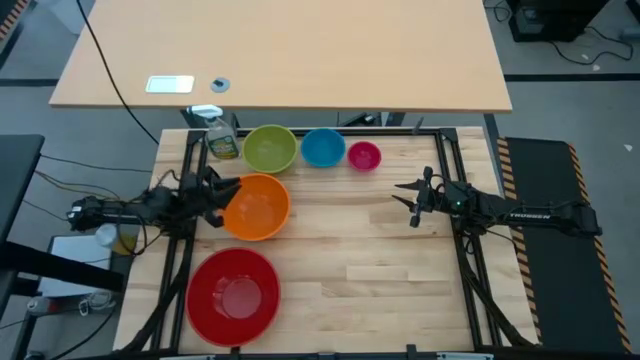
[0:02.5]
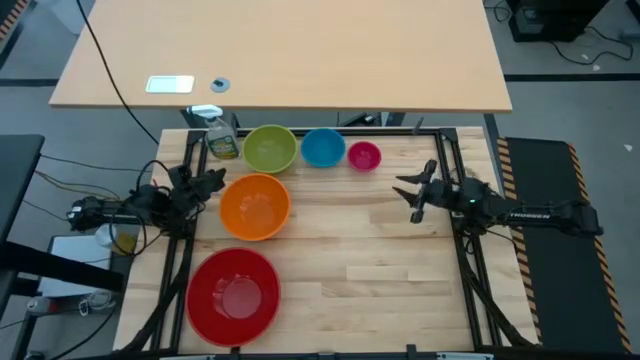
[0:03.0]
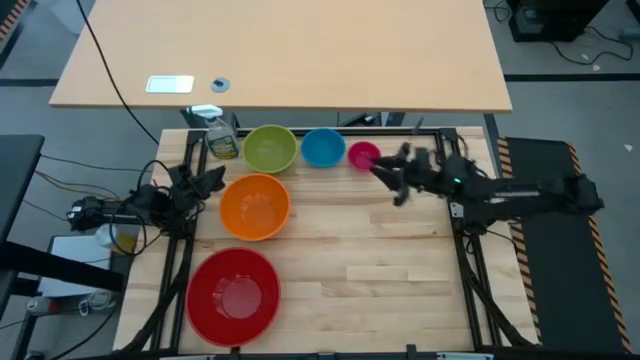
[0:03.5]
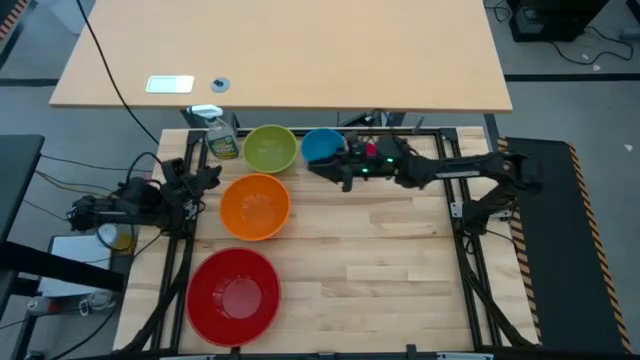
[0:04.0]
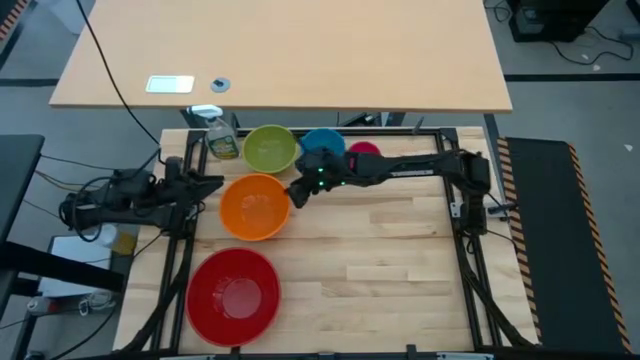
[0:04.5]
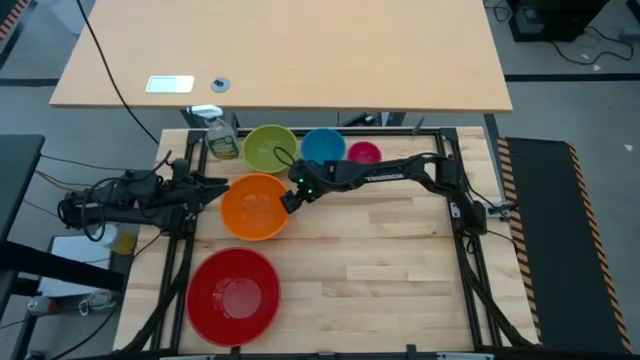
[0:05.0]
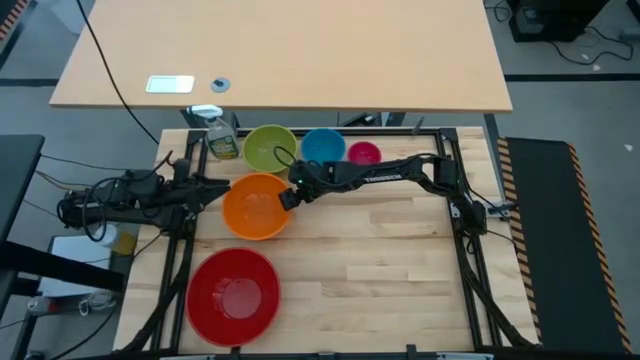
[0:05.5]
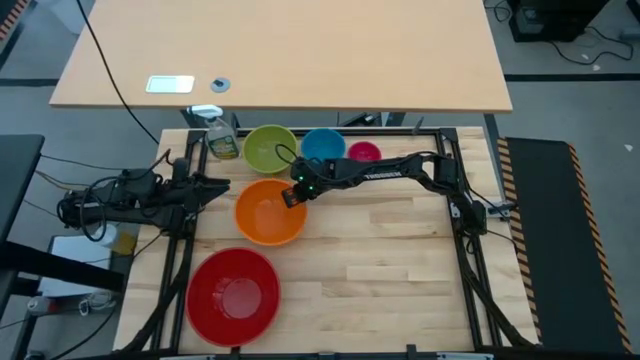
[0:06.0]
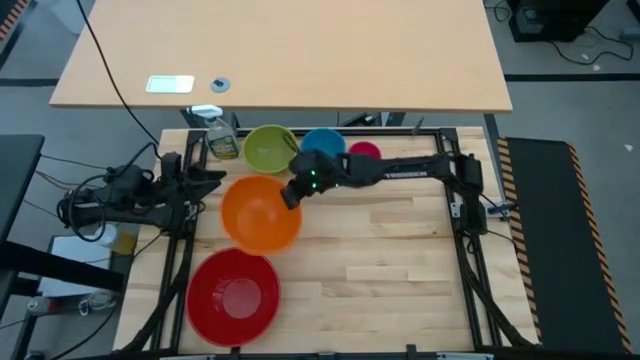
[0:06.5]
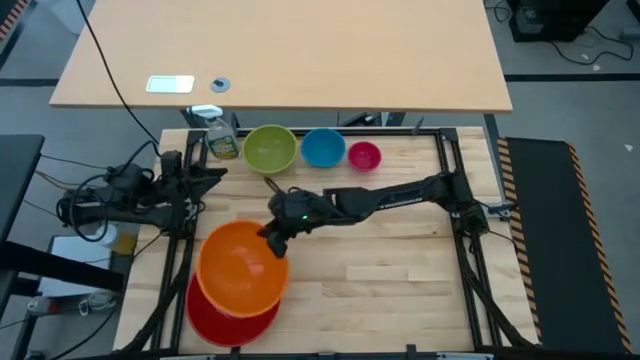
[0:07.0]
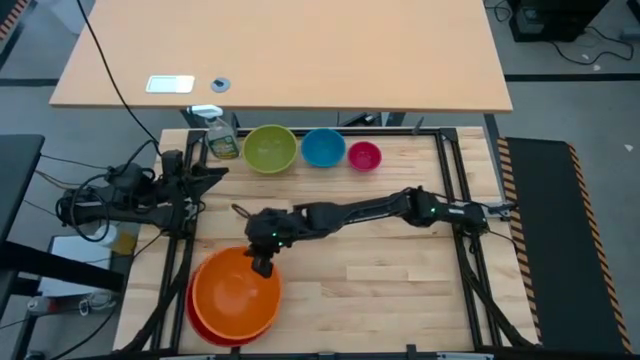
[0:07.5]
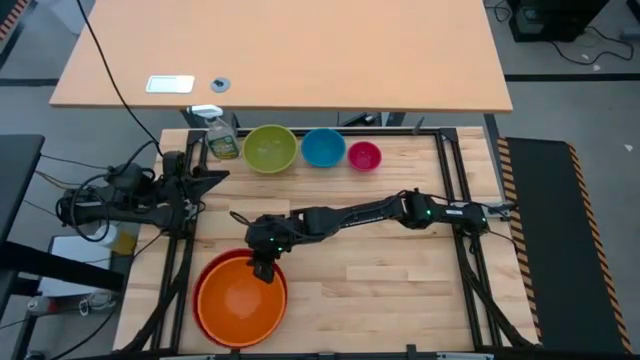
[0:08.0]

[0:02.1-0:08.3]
Stack the orange bowl on top of the red bowl

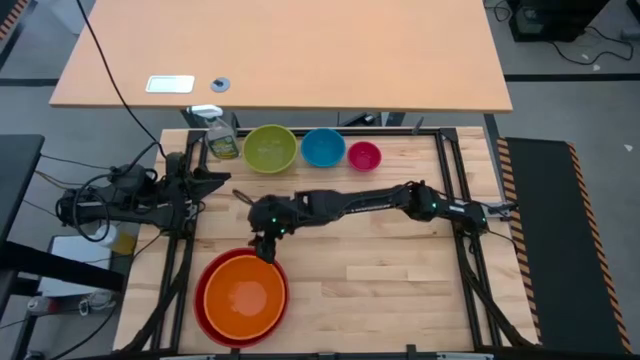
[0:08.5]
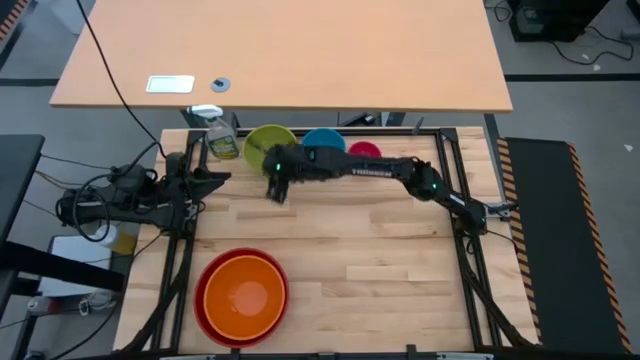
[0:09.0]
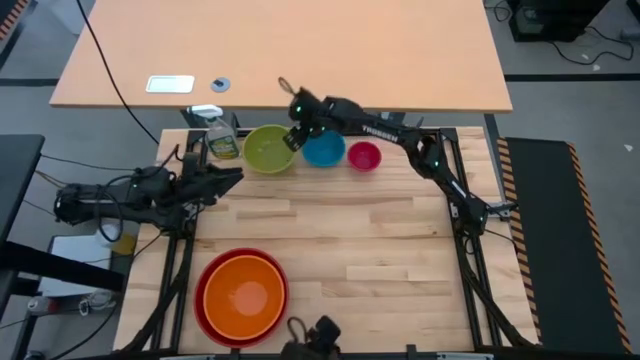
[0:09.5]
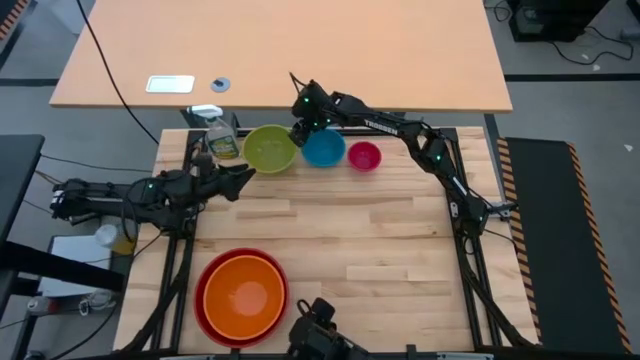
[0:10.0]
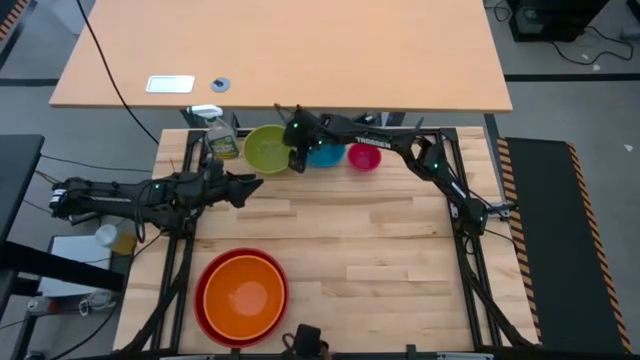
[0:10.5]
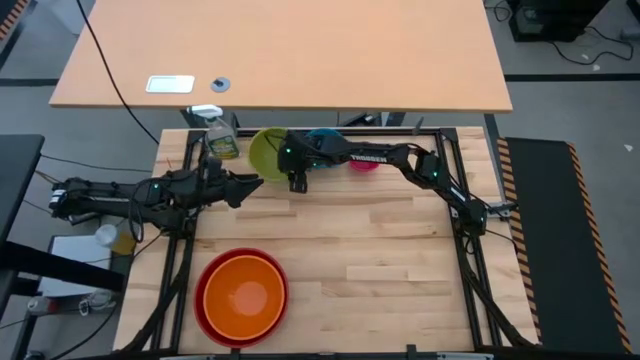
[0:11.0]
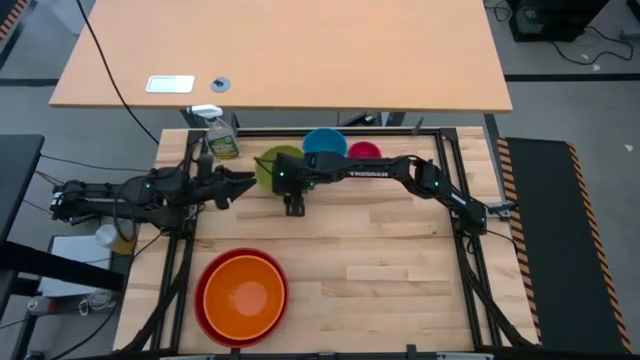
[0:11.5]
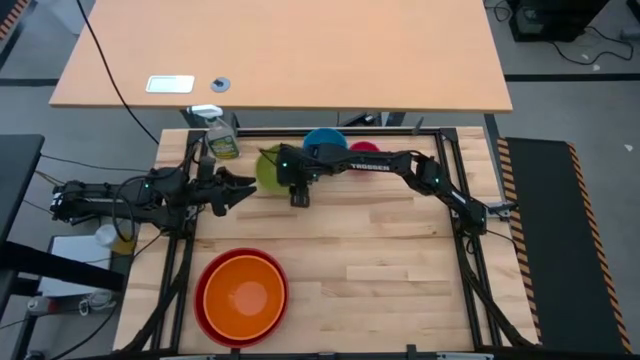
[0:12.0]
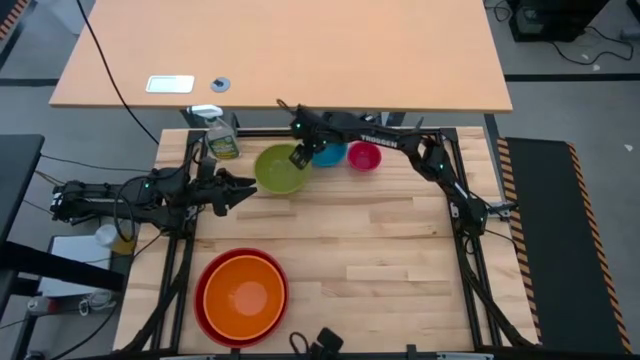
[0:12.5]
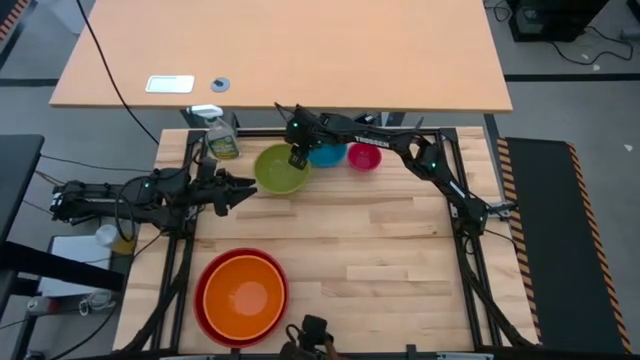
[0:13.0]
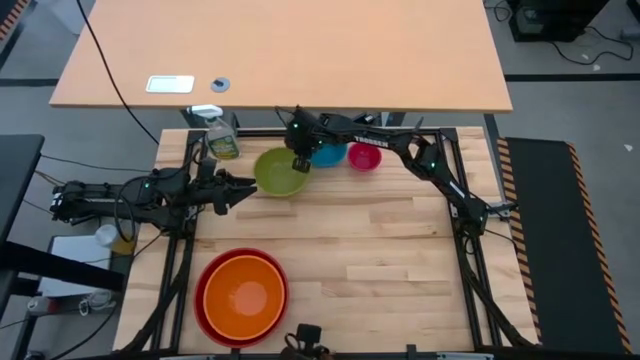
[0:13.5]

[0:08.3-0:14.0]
Stack the green bowl on top of the orange bowl

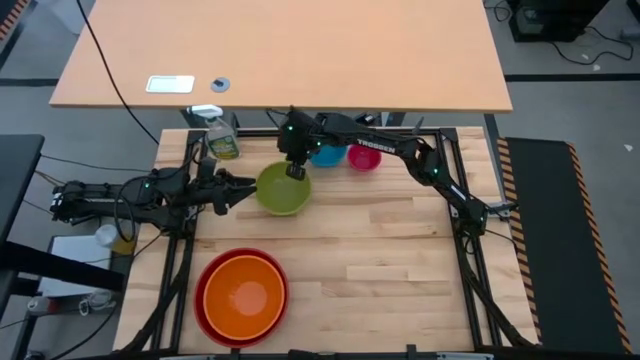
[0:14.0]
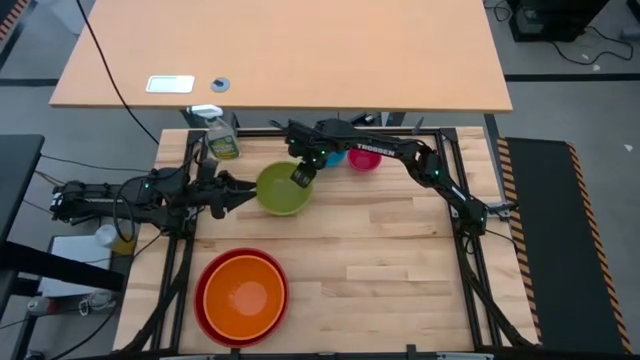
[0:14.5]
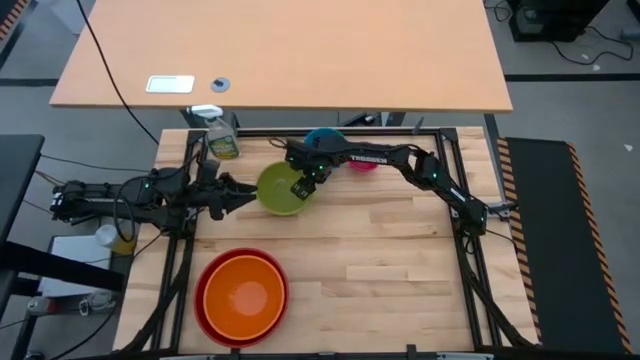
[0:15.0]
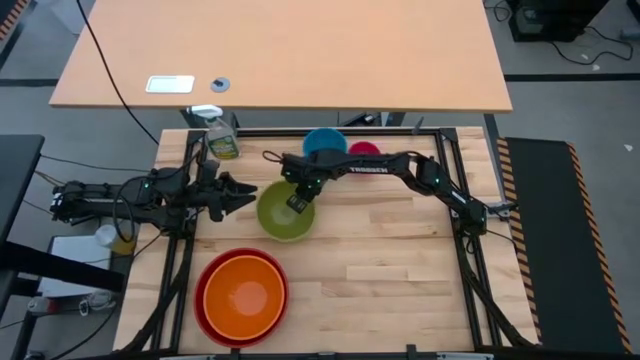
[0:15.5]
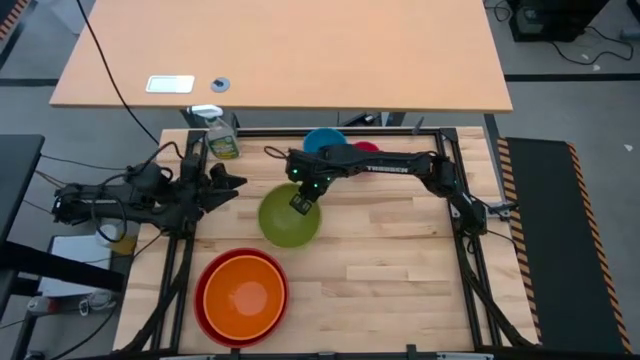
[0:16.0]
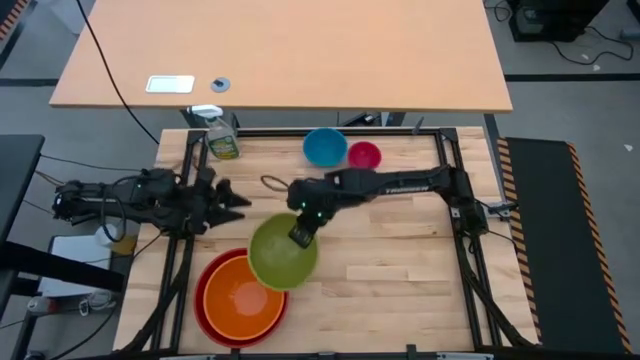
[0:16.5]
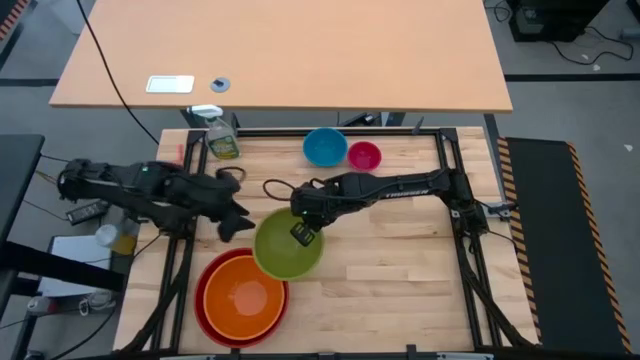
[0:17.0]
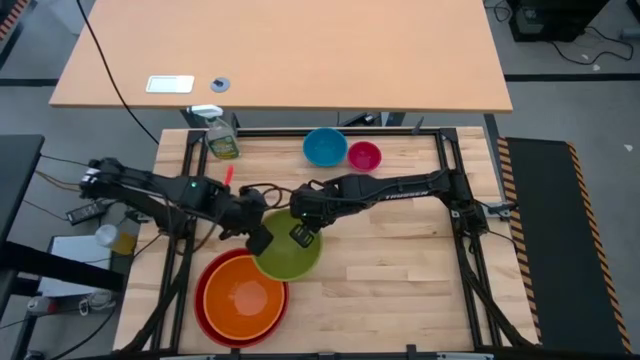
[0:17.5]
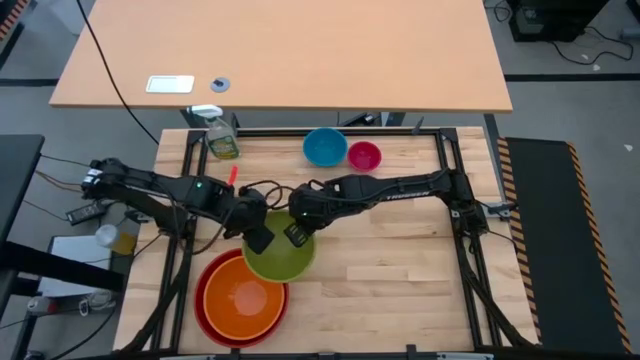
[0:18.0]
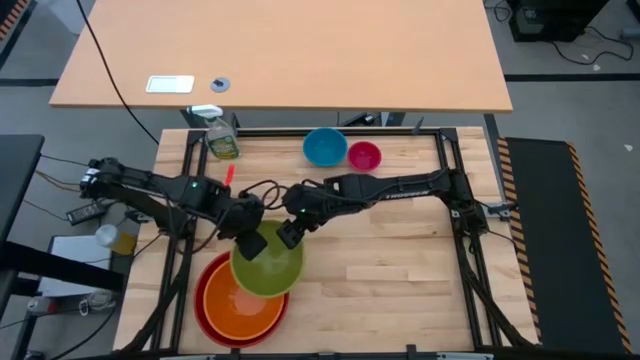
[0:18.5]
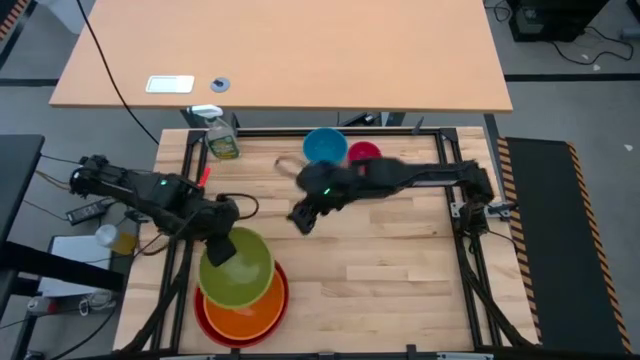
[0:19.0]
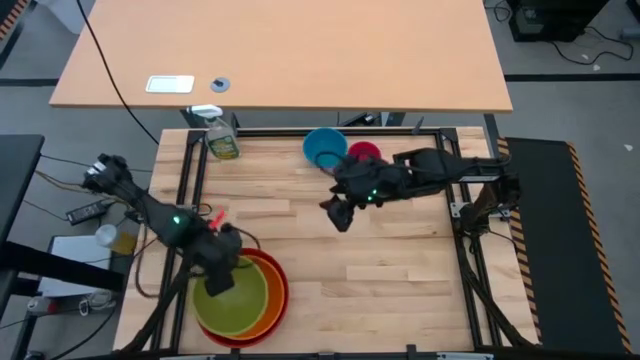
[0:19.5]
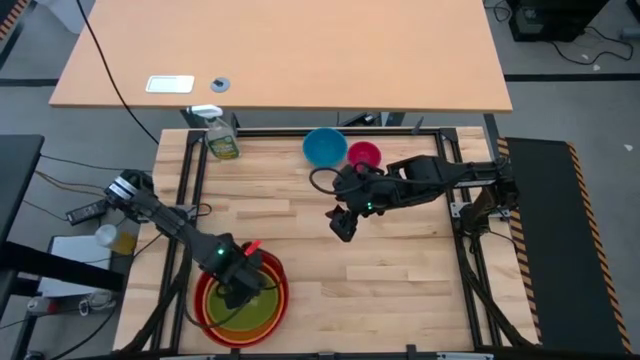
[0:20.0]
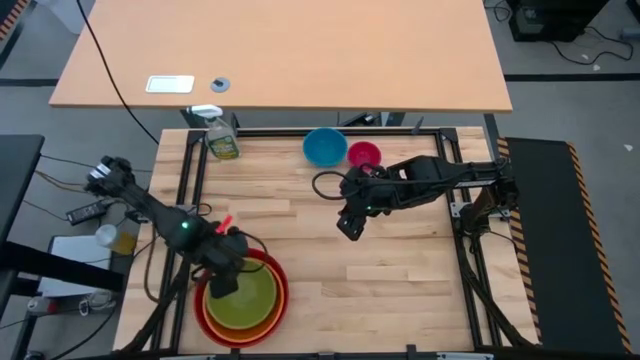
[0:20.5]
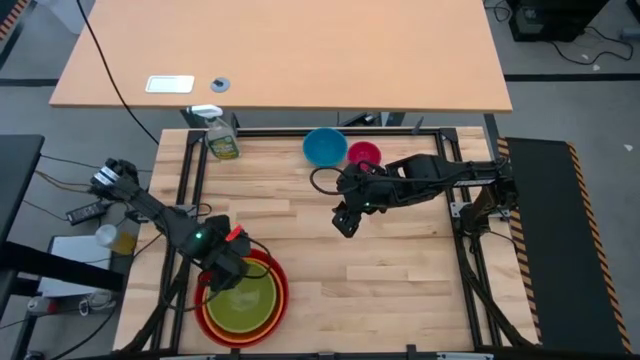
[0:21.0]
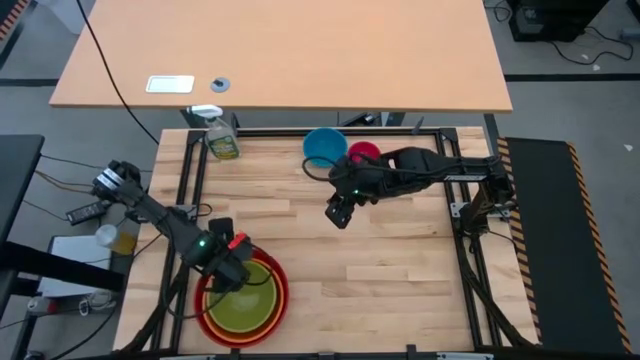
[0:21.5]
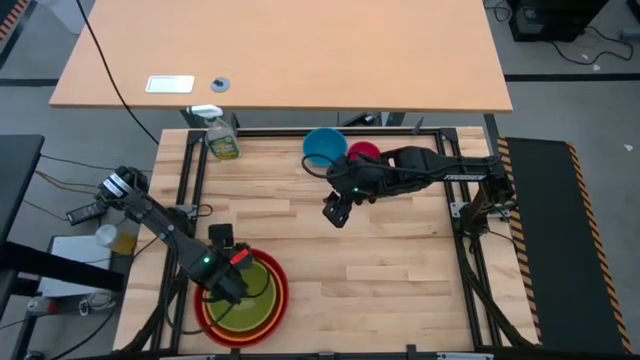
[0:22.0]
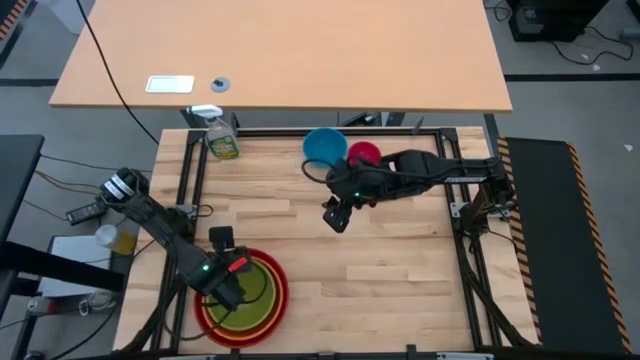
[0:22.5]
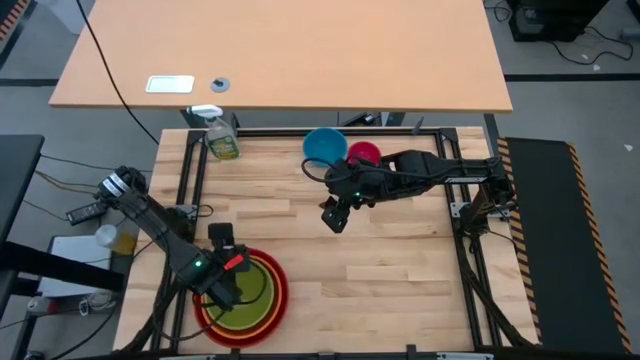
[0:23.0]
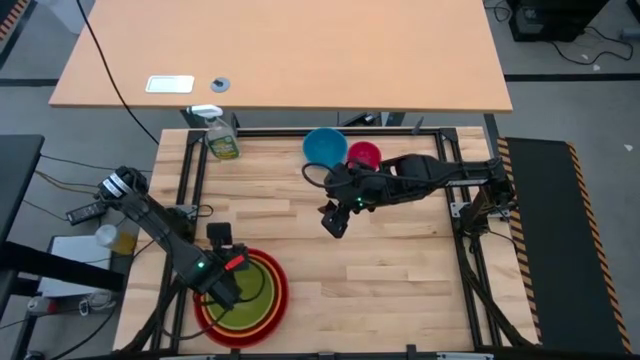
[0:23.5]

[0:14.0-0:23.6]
Stack the green bowl on top of the orange bowl
